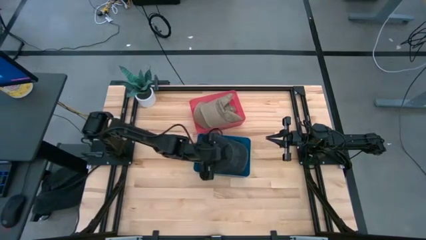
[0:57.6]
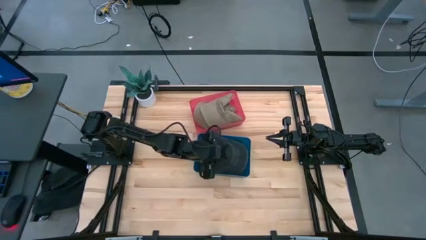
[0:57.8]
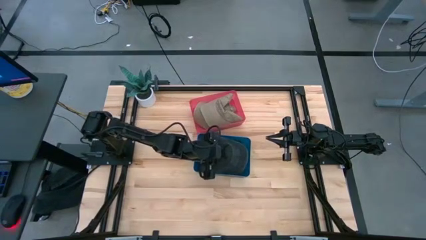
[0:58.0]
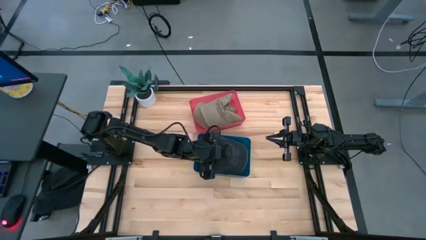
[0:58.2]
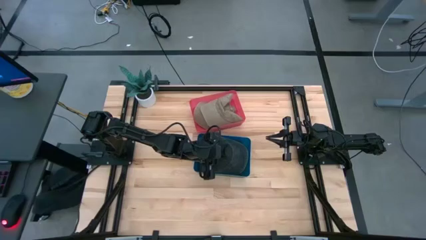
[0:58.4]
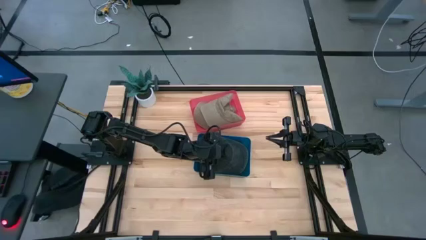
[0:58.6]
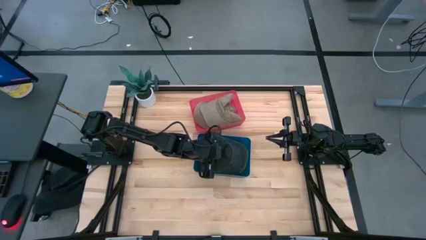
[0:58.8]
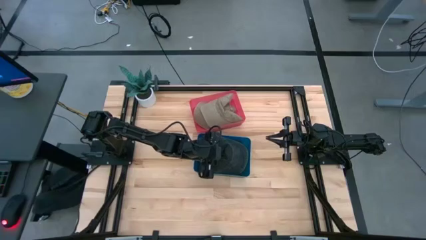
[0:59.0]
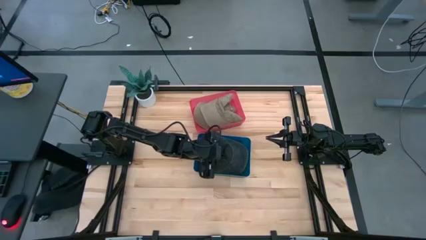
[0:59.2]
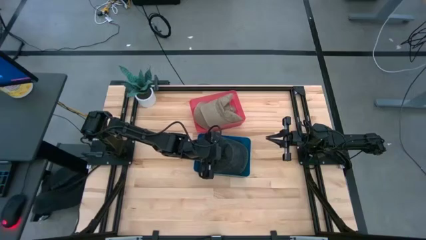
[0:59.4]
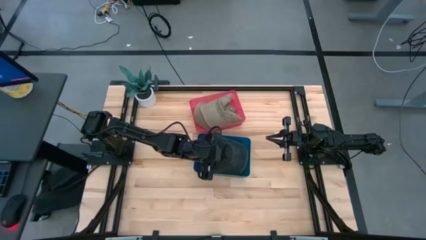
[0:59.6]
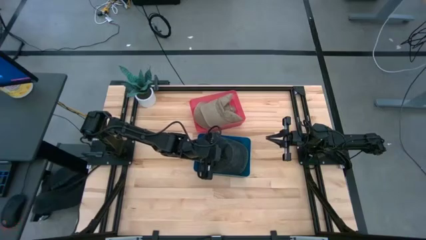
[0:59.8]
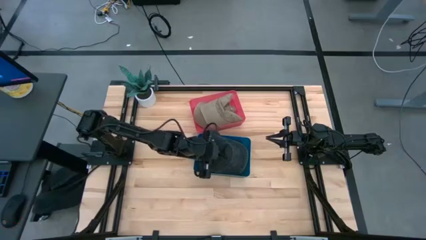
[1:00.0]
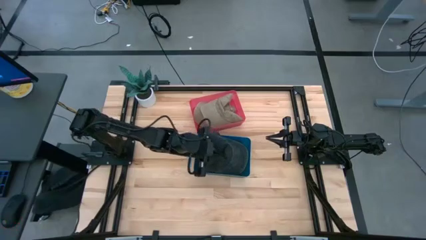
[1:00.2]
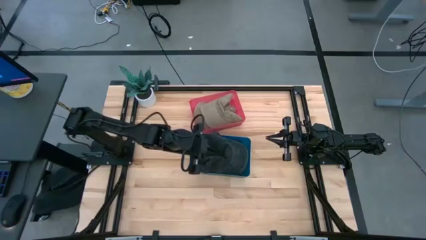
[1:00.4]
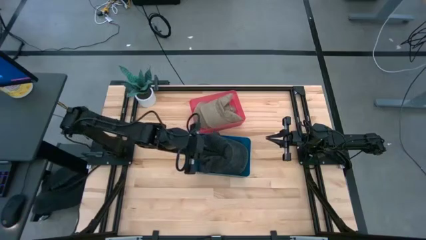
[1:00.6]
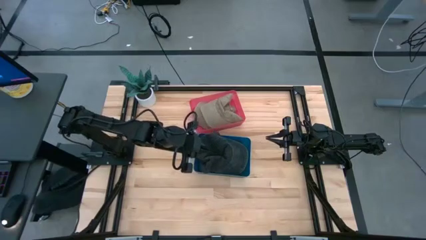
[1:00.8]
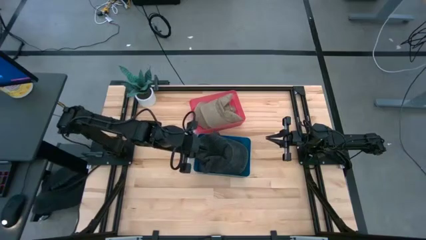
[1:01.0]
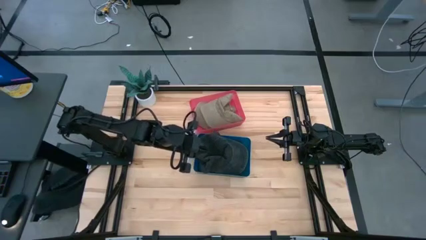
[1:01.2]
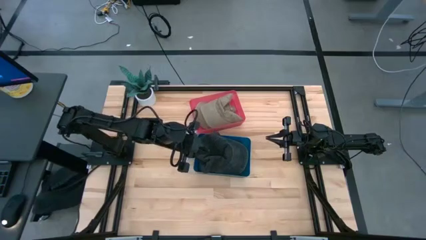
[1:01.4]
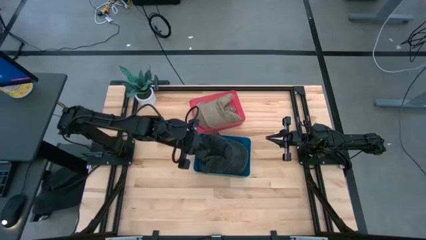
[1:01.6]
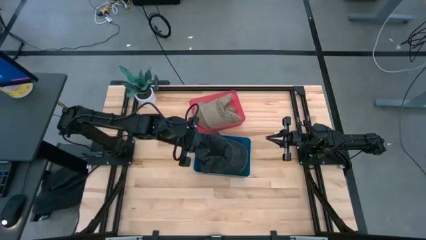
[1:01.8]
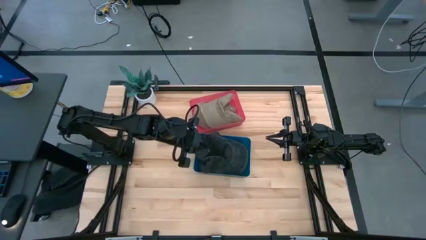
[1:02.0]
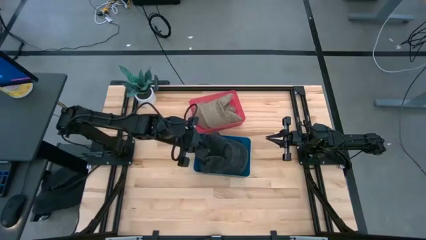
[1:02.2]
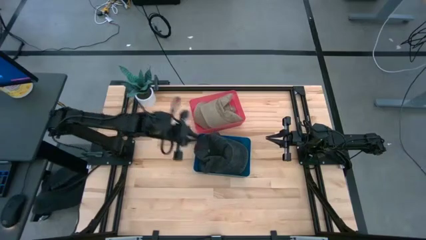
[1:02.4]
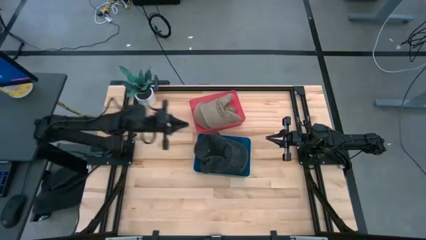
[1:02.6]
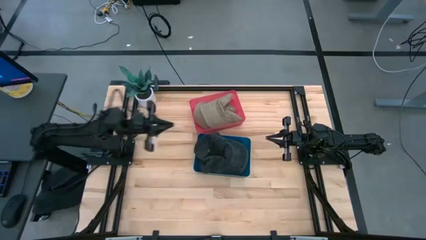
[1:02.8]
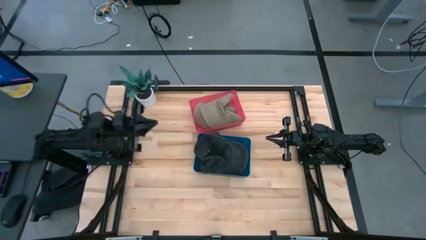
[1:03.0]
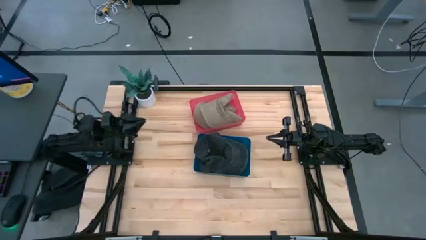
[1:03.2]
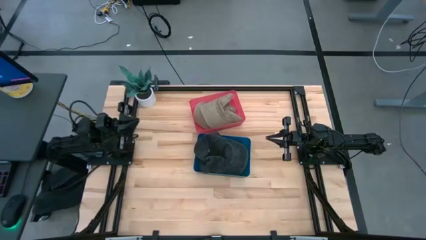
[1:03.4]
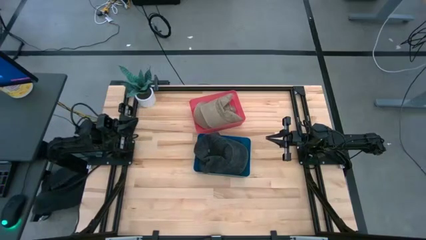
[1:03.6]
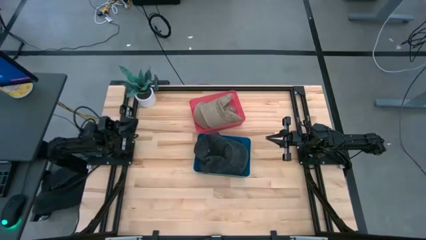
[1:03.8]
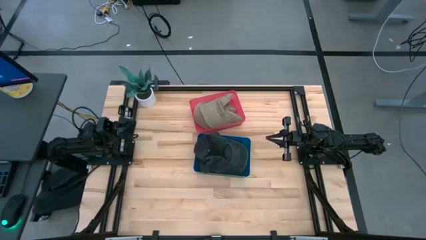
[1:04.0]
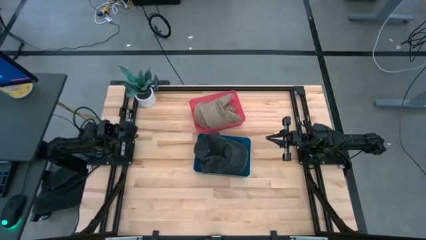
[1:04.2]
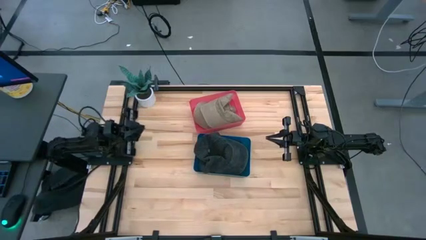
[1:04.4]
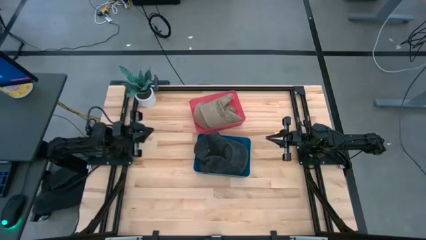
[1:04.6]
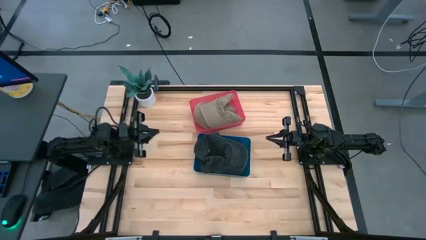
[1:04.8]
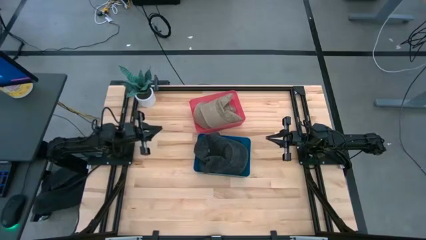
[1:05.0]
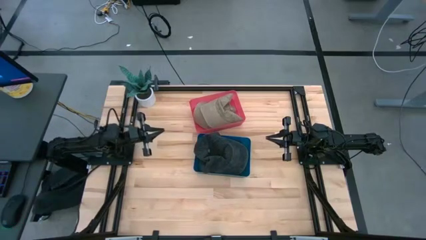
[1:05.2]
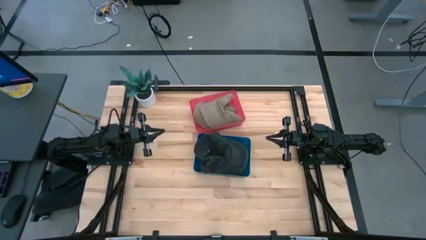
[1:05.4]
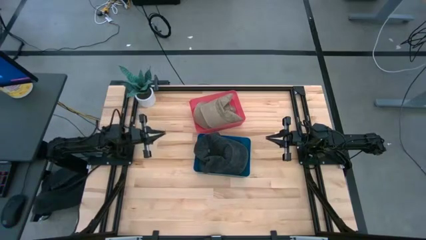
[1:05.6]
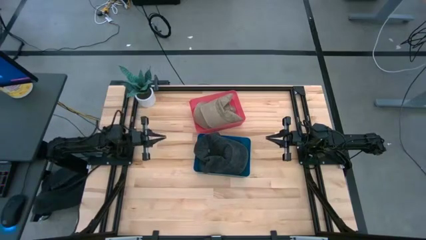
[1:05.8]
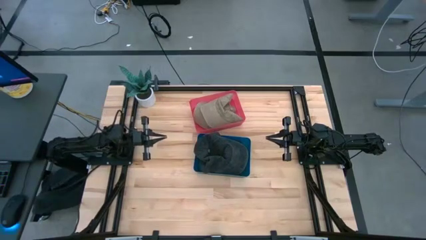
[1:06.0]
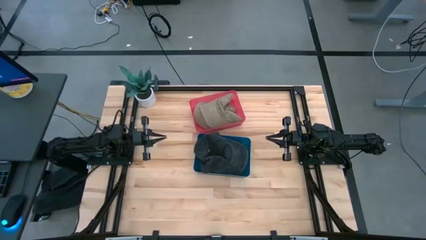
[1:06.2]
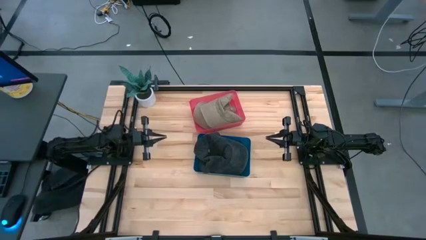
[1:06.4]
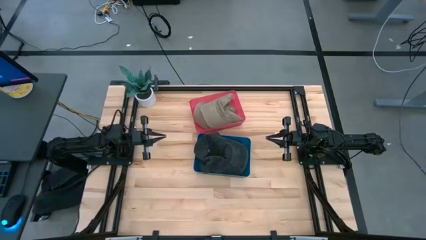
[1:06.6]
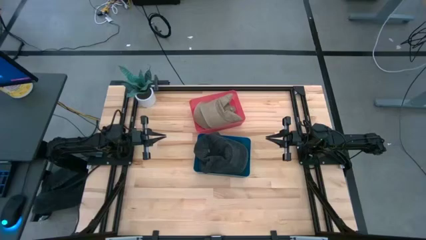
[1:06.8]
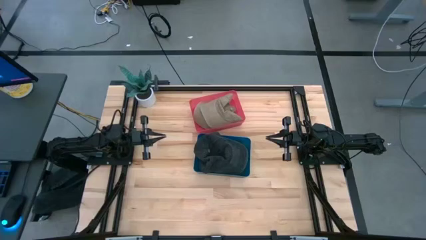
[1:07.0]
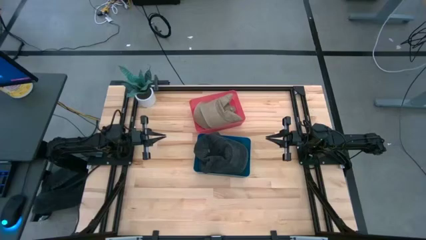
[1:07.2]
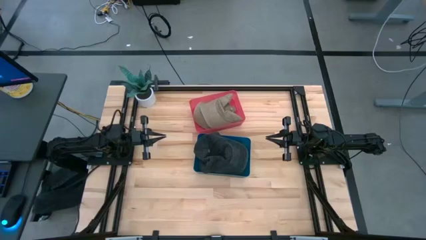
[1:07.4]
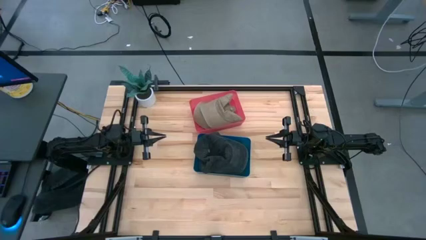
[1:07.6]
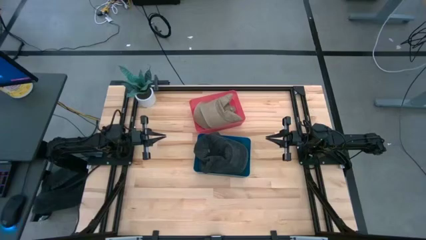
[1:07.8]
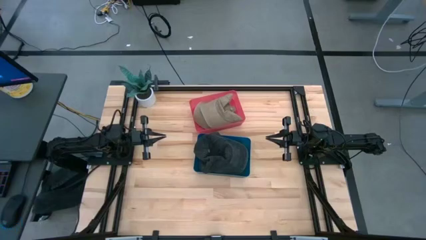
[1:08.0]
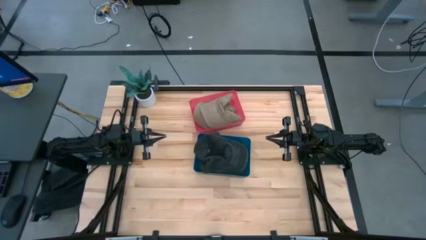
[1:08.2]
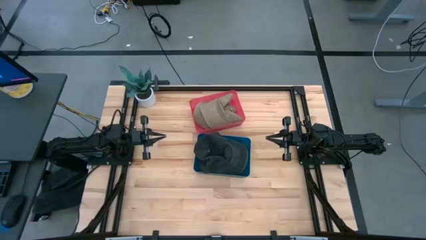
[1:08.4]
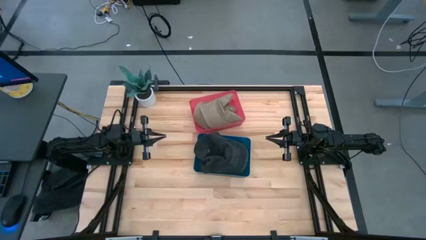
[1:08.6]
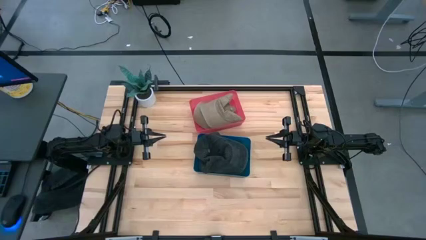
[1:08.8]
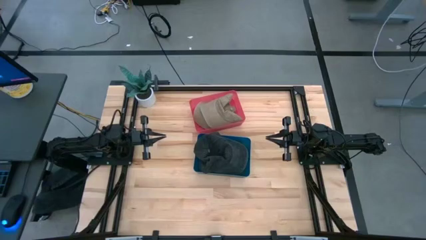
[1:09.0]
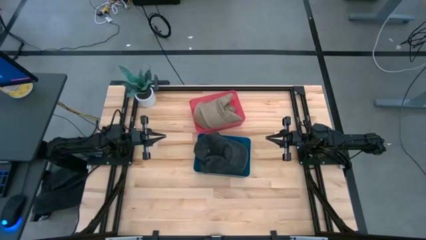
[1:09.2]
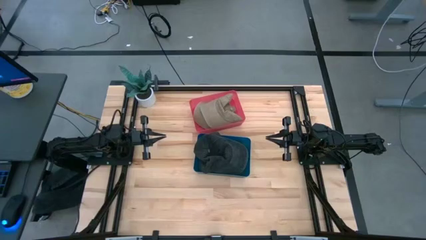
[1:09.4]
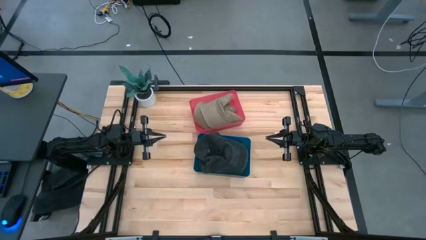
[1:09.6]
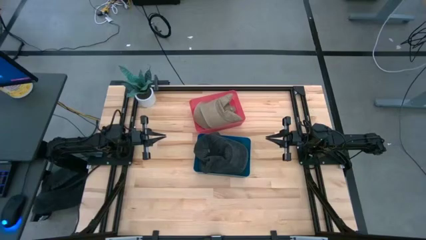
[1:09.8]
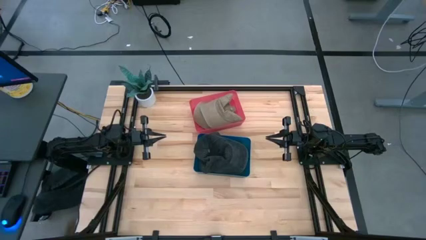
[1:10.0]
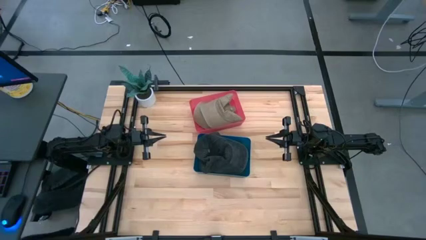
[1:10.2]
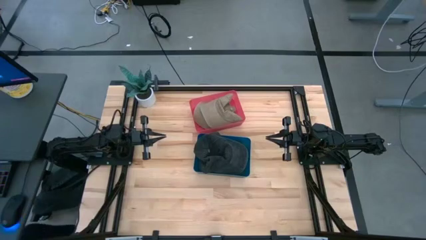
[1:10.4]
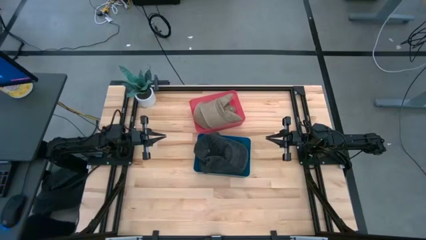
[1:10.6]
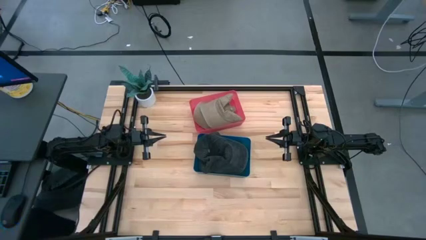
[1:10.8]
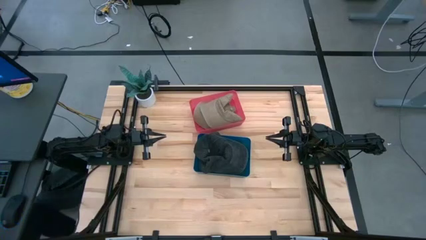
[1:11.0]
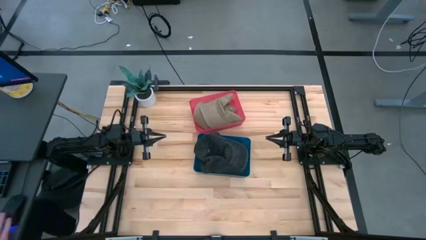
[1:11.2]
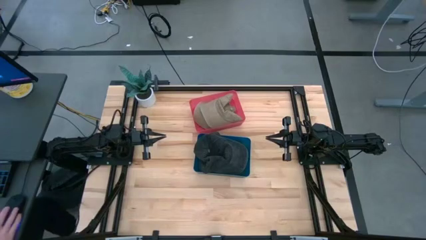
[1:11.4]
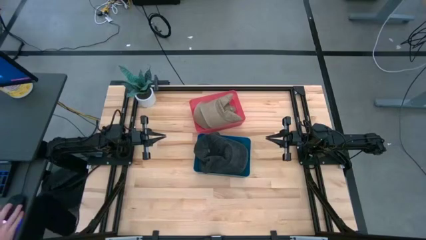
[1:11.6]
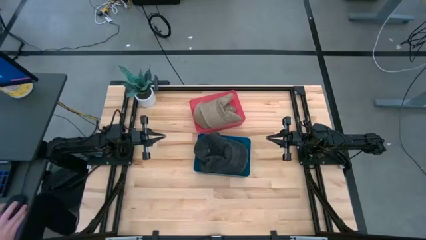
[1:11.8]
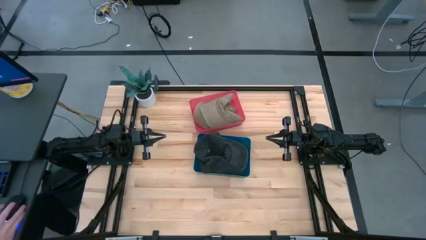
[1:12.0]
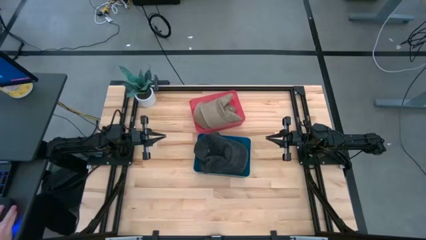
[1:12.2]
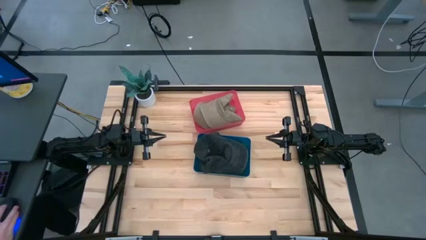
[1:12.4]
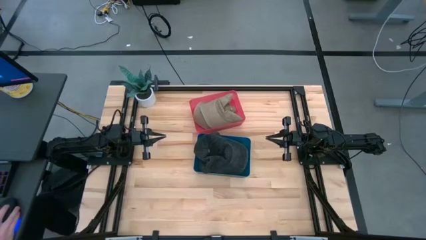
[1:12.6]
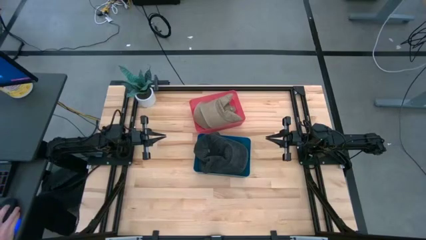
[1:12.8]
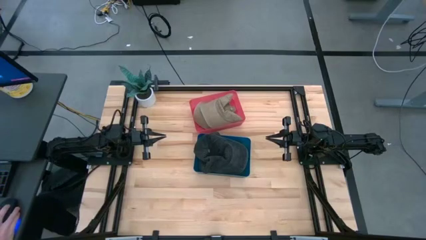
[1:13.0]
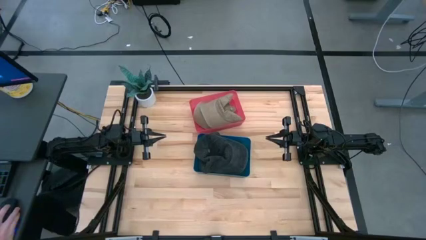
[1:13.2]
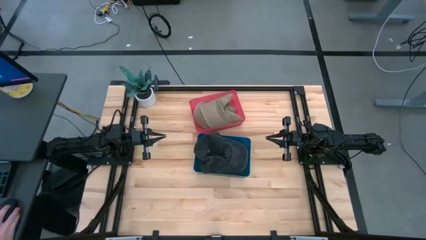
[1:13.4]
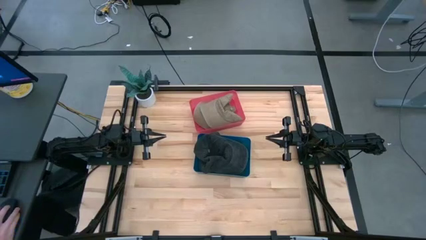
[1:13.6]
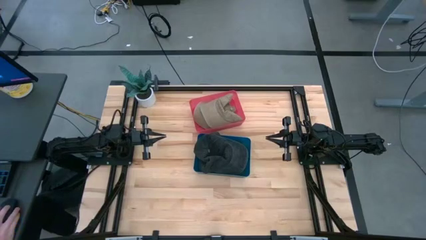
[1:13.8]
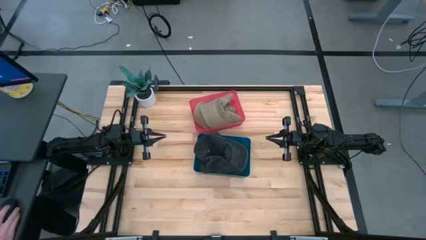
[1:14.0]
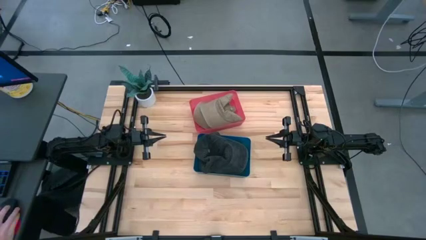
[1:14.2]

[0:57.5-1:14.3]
Task: Pick & Place hat
Return to Home Position
